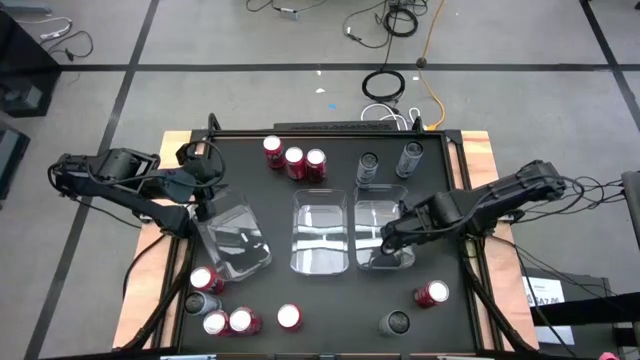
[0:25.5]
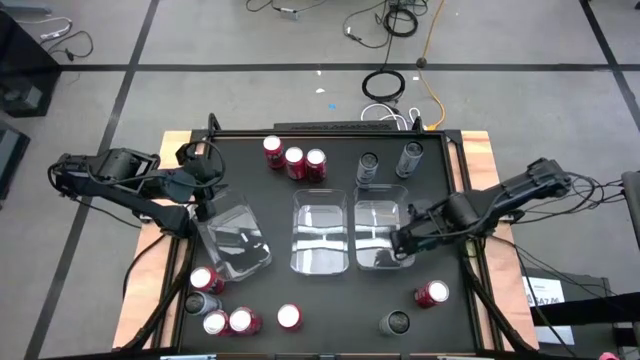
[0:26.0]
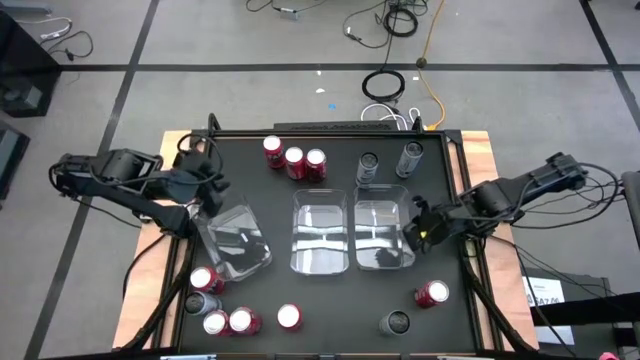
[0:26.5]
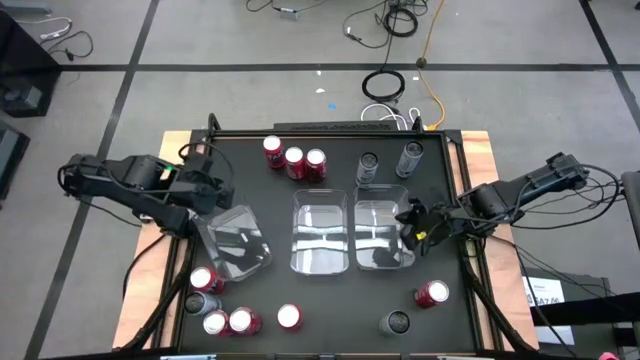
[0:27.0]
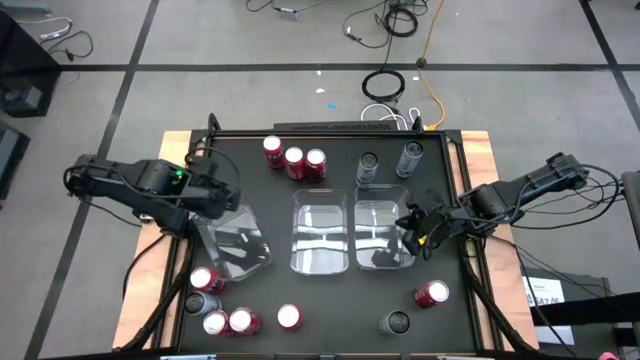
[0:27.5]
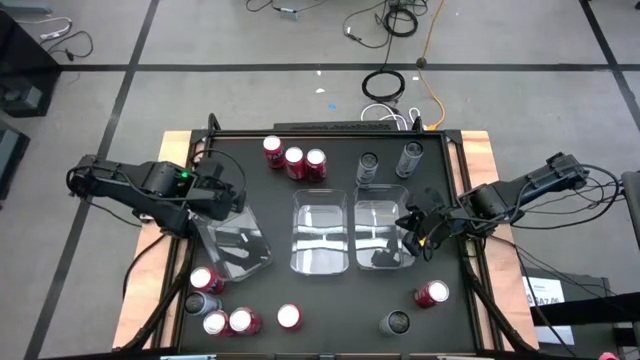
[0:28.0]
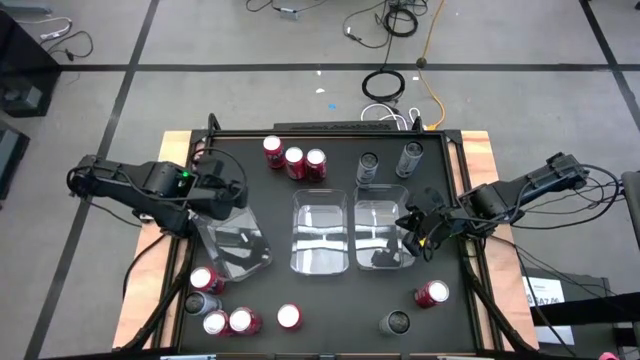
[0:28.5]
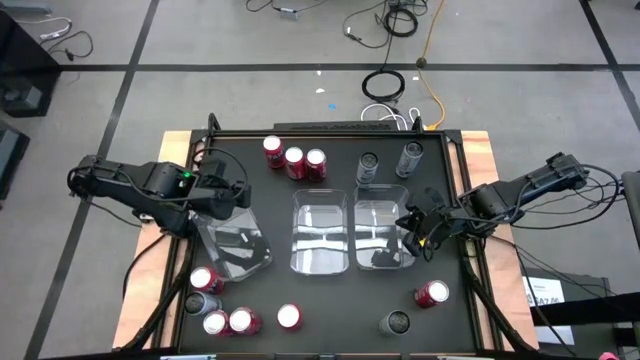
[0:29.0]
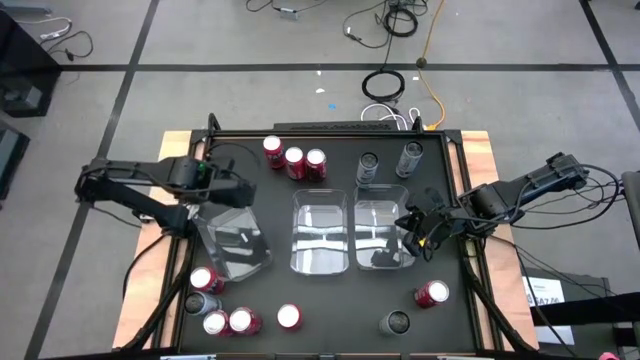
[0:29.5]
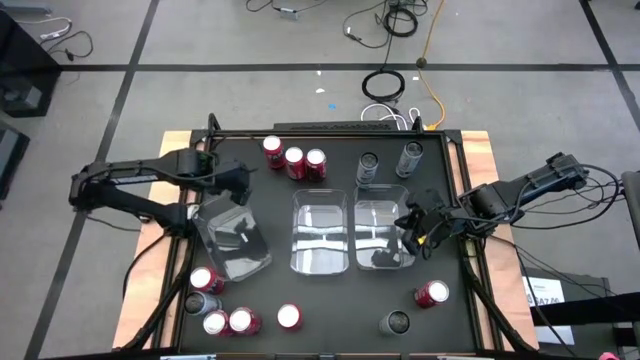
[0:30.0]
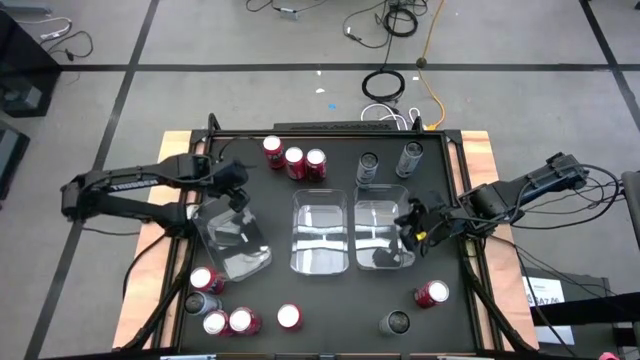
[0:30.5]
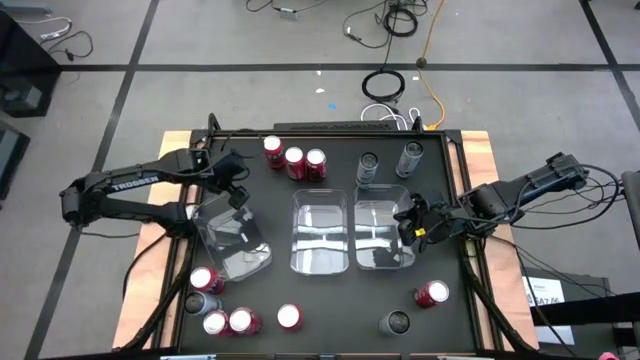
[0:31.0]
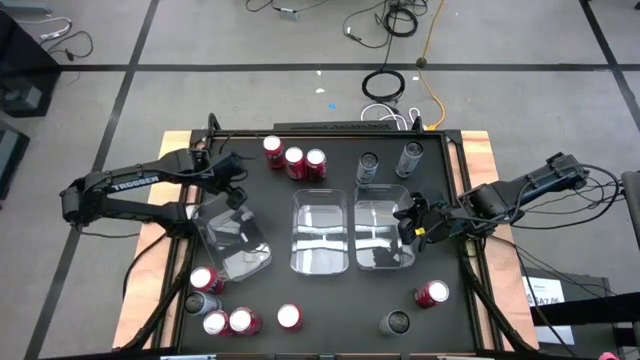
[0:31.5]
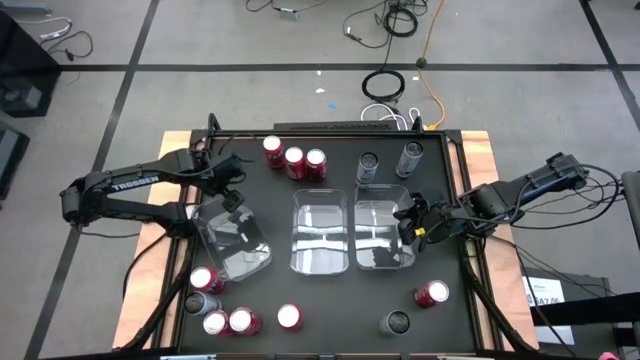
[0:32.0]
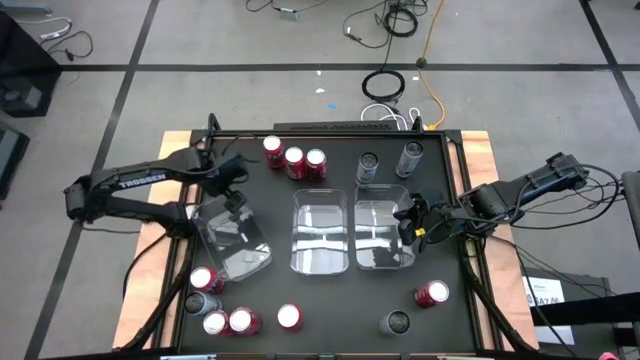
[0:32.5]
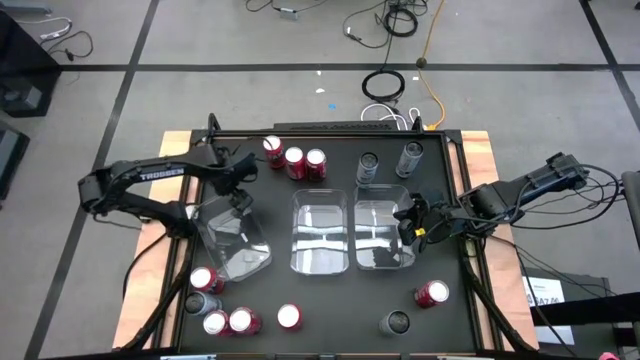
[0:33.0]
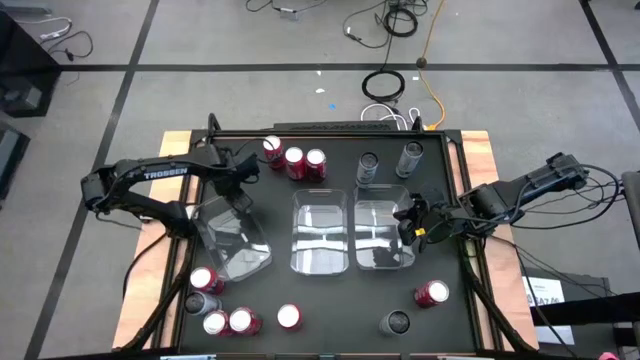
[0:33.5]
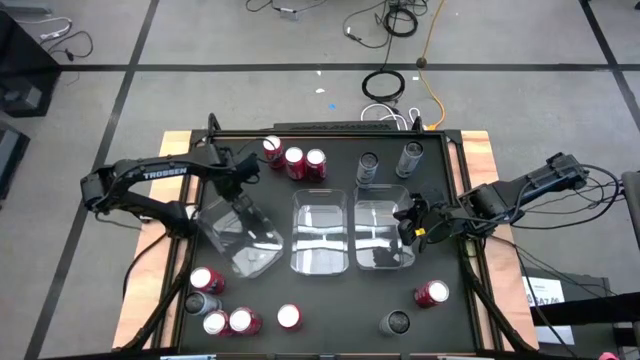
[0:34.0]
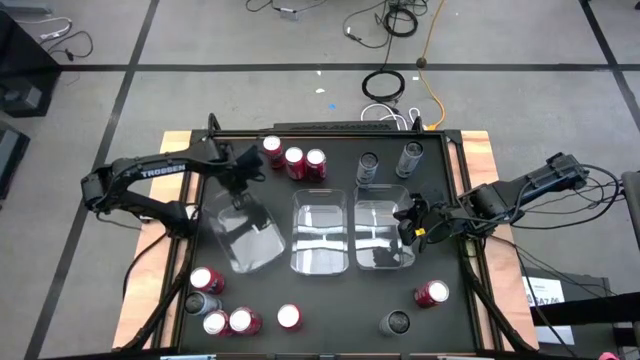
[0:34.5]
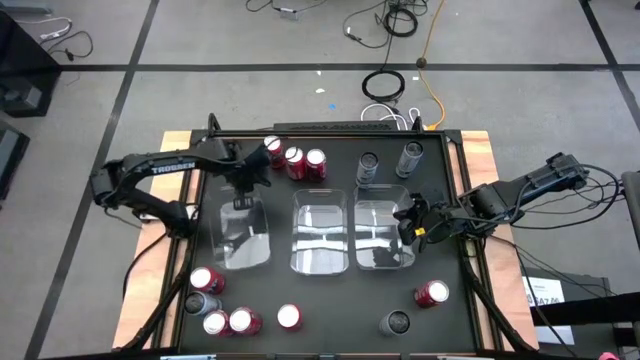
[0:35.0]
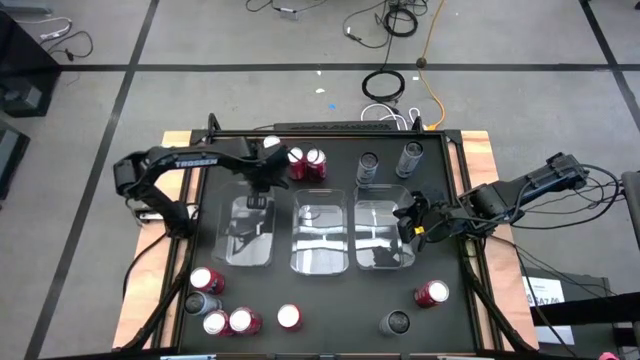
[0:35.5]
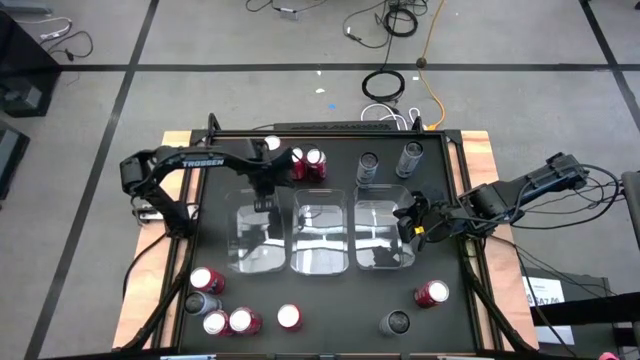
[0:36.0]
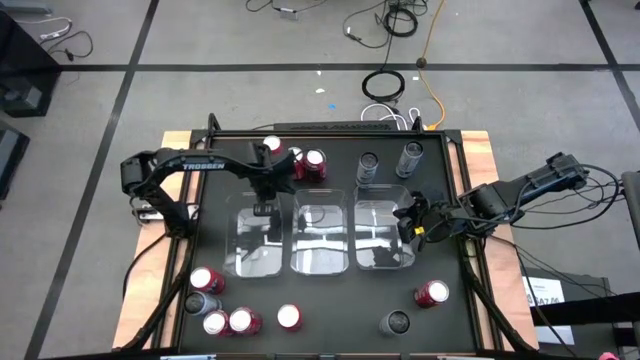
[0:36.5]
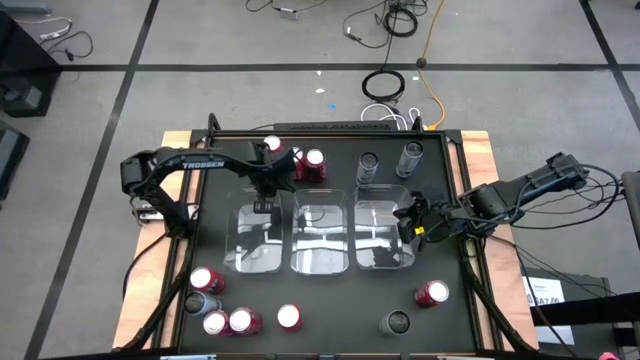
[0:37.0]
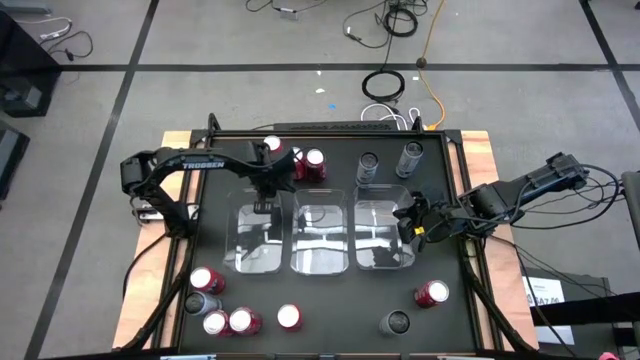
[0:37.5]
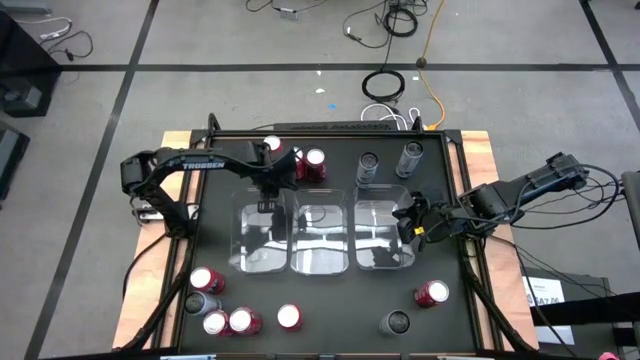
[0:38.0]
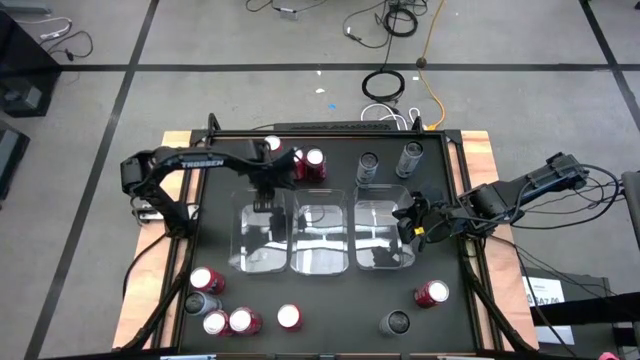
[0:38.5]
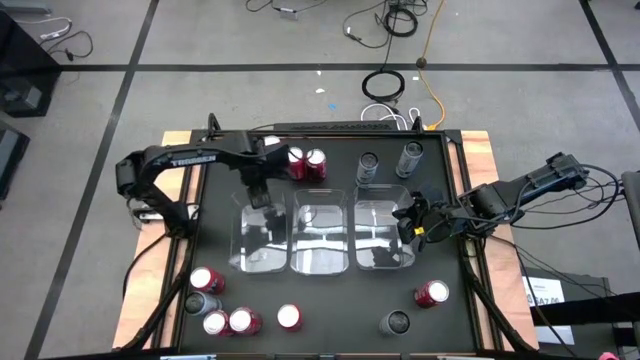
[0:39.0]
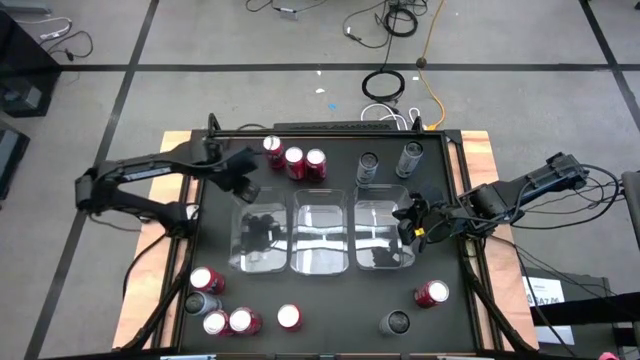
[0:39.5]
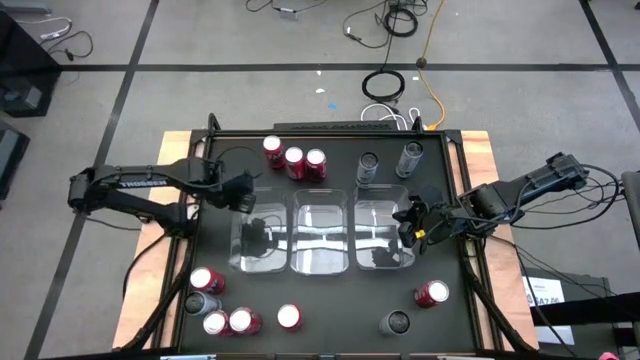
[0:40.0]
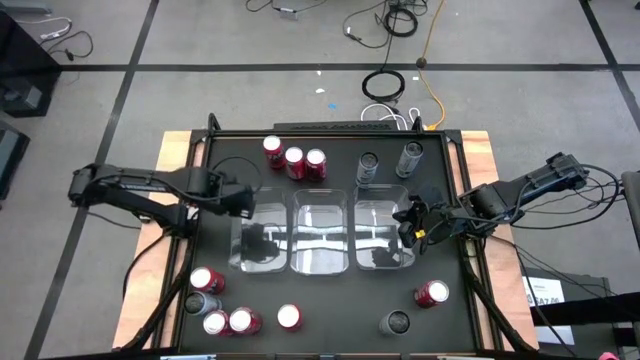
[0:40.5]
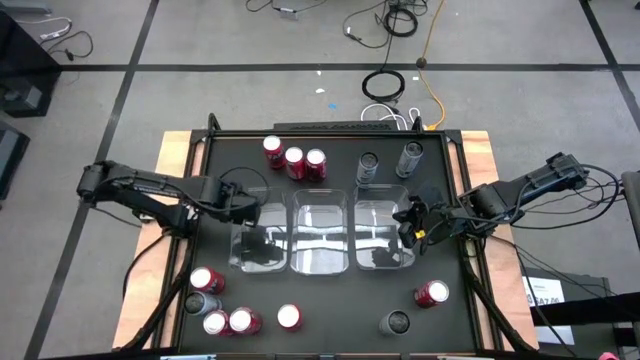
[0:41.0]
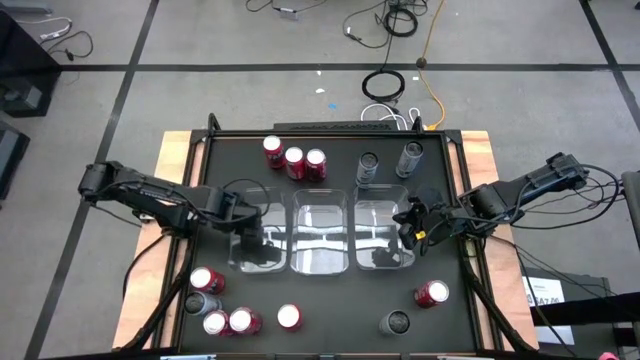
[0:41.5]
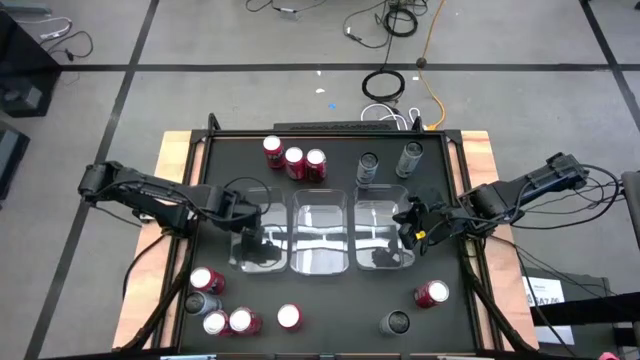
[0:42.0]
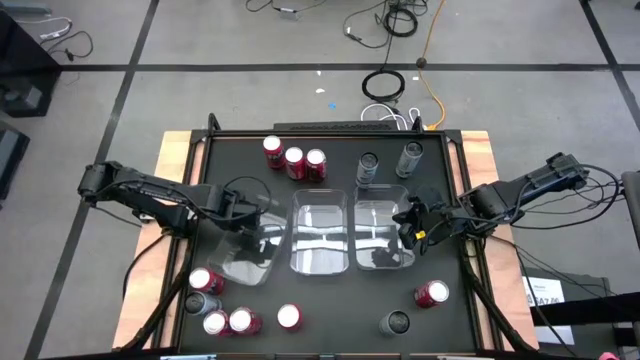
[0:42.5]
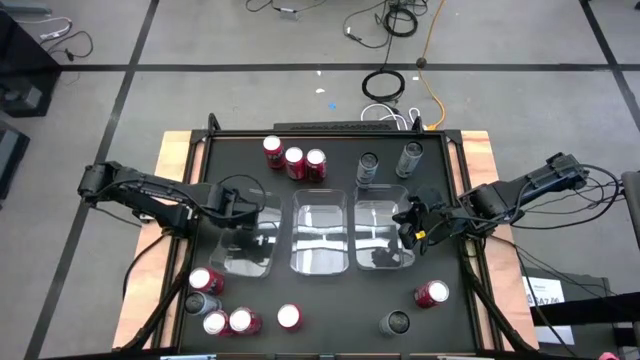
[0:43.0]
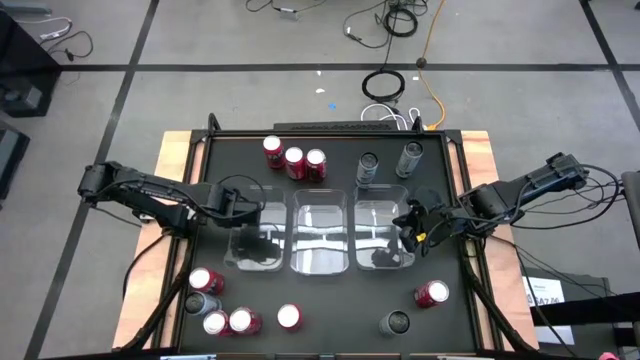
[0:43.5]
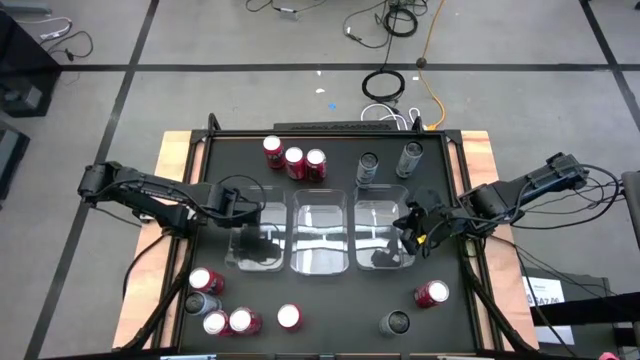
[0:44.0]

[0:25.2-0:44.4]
Task: Sort soda cans
Move the left transparent bin beside the center transparent bin

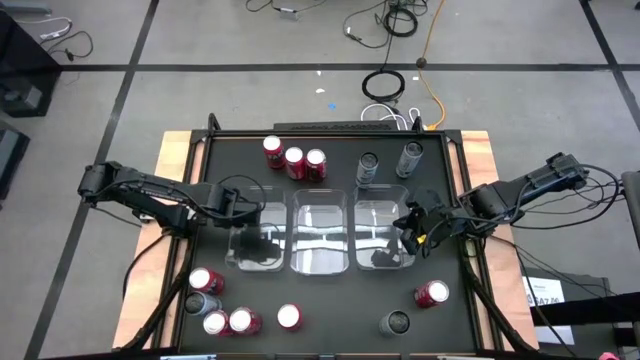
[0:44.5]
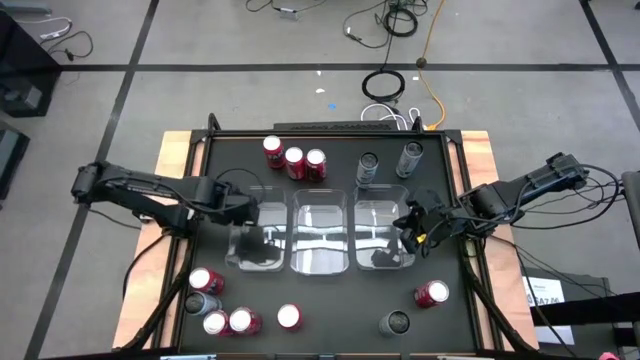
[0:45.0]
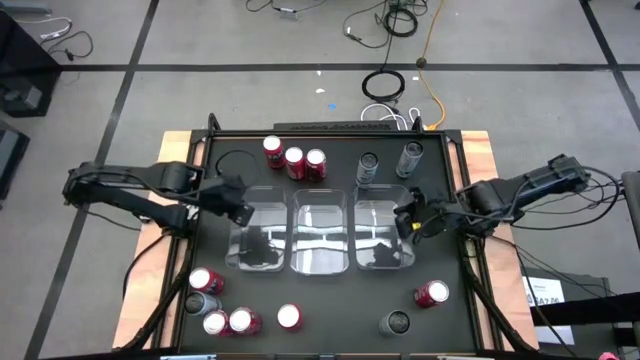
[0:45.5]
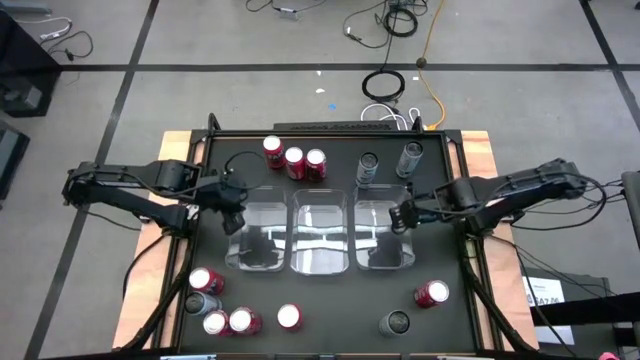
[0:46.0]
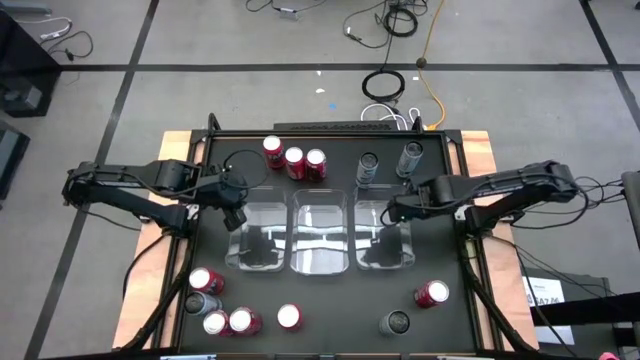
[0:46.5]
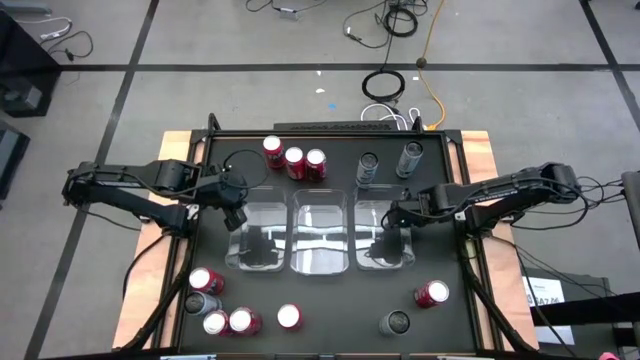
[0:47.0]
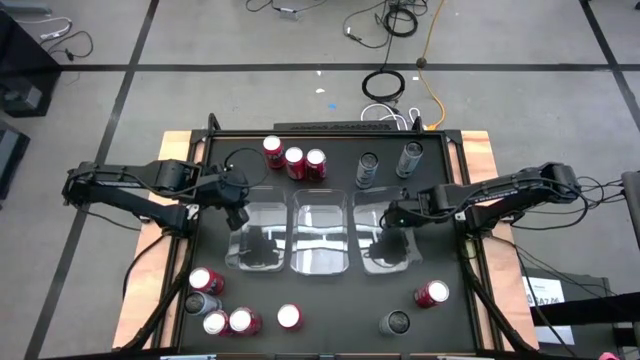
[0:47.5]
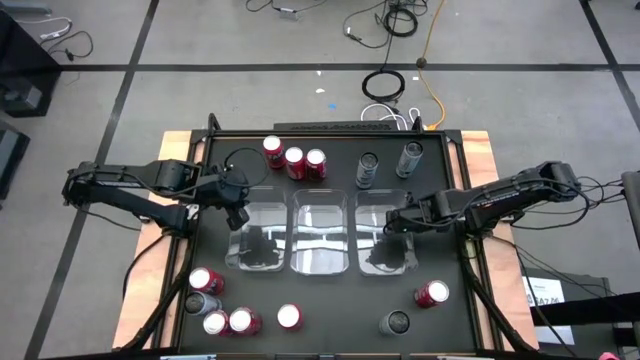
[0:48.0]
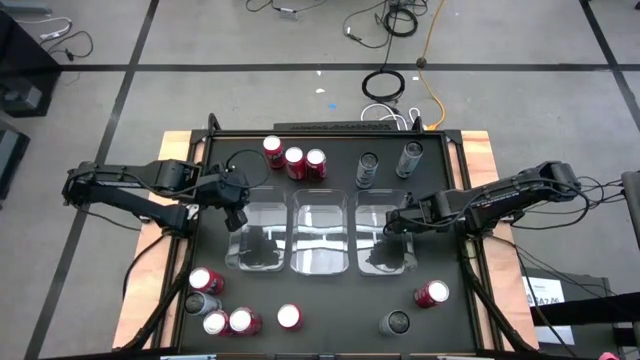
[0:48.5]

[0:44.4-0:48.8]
Adjust the right transparent bin
